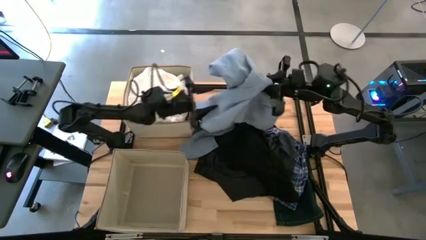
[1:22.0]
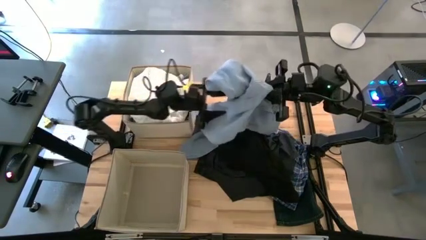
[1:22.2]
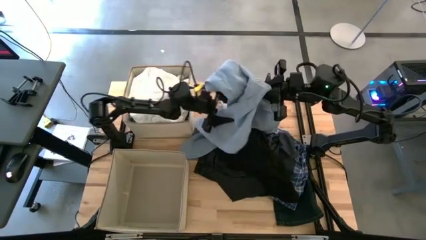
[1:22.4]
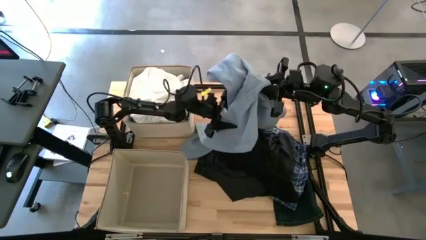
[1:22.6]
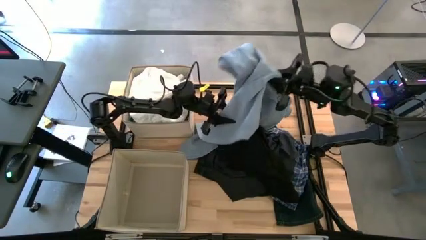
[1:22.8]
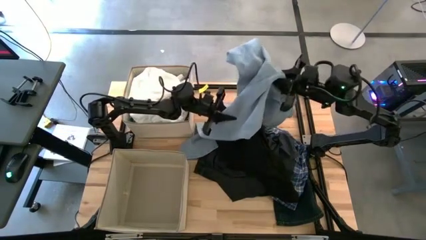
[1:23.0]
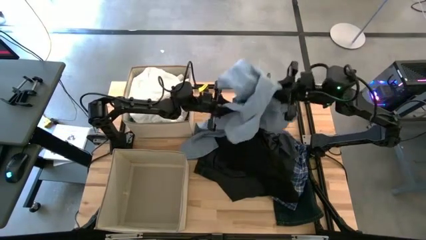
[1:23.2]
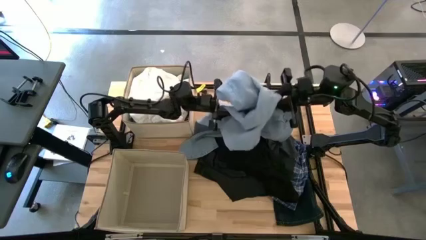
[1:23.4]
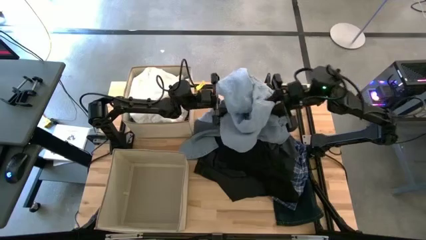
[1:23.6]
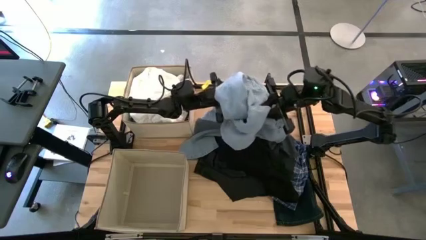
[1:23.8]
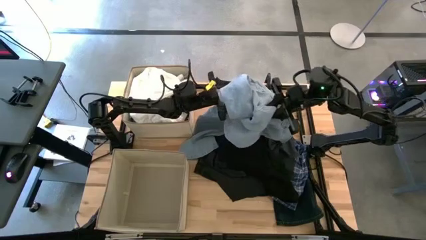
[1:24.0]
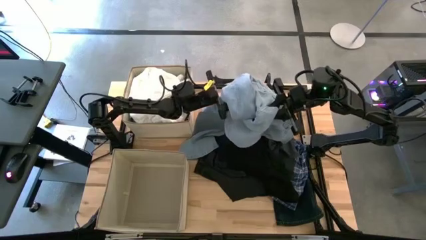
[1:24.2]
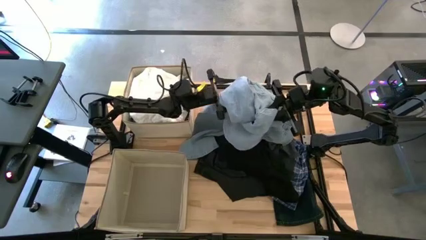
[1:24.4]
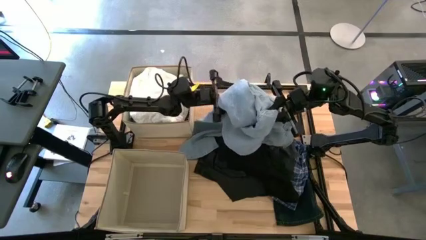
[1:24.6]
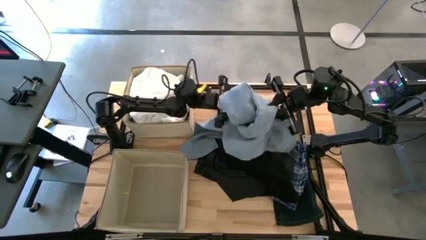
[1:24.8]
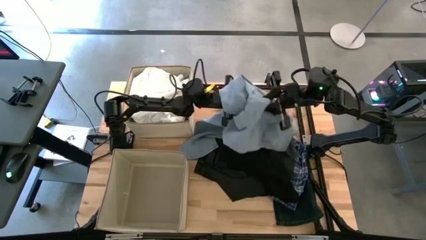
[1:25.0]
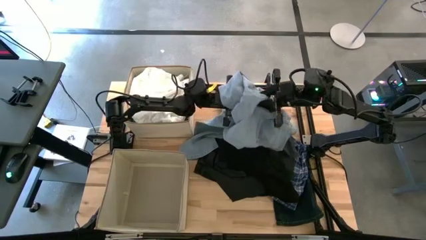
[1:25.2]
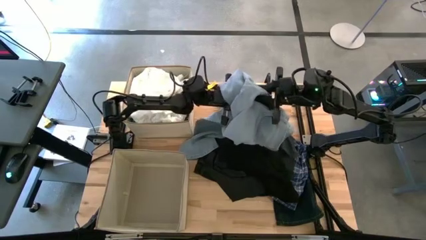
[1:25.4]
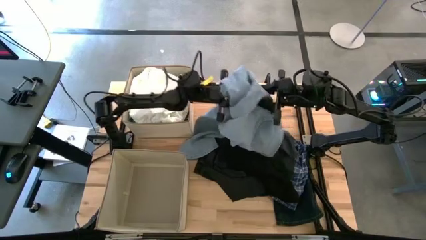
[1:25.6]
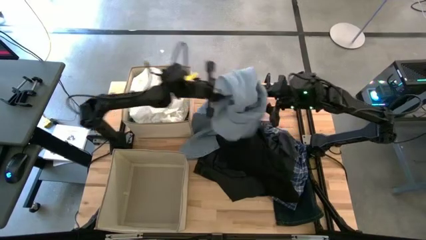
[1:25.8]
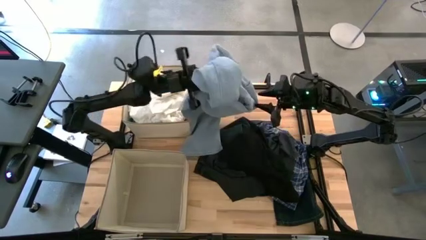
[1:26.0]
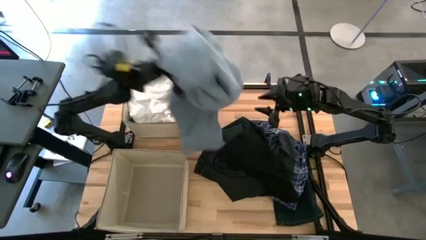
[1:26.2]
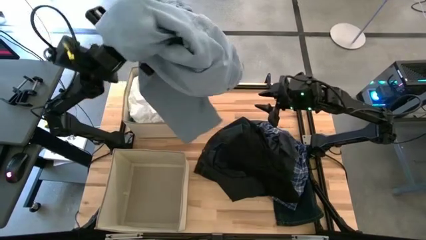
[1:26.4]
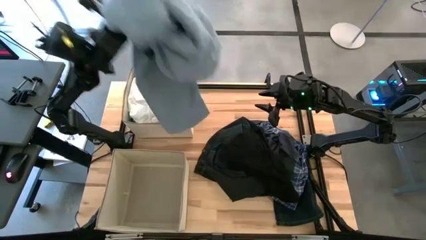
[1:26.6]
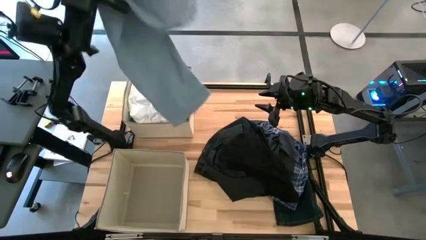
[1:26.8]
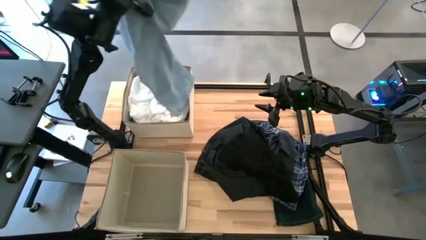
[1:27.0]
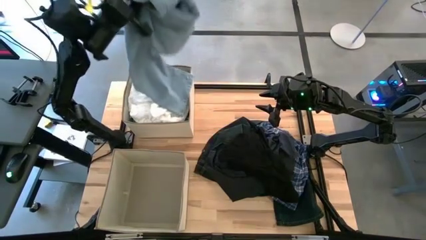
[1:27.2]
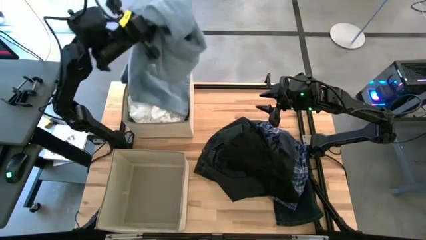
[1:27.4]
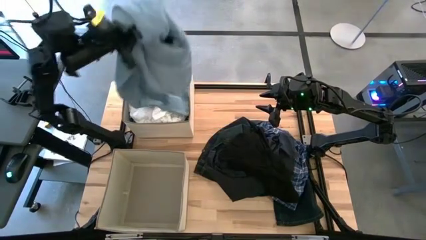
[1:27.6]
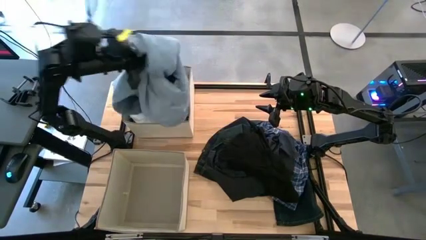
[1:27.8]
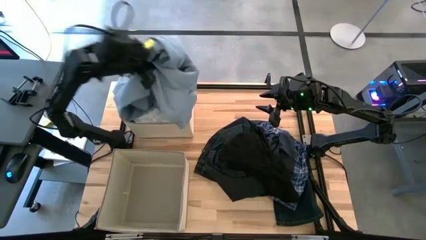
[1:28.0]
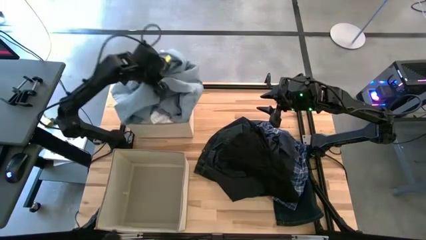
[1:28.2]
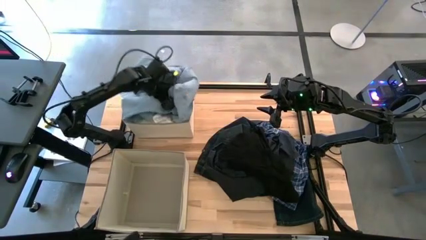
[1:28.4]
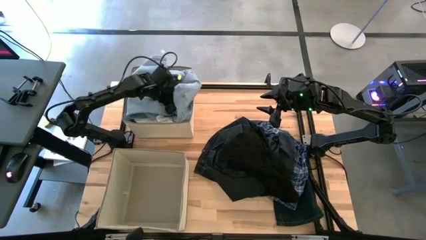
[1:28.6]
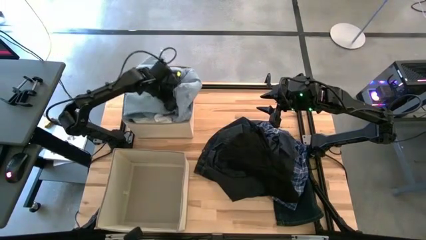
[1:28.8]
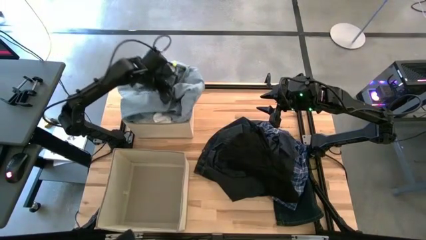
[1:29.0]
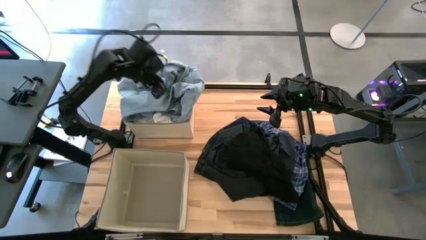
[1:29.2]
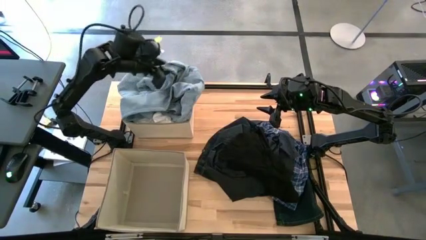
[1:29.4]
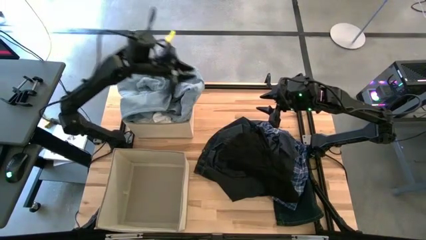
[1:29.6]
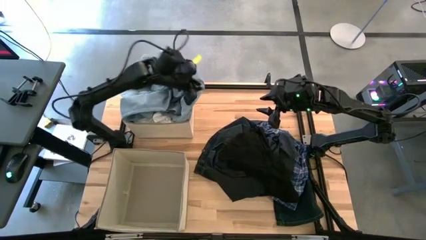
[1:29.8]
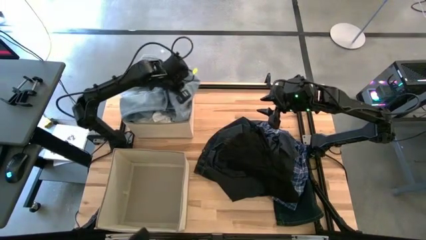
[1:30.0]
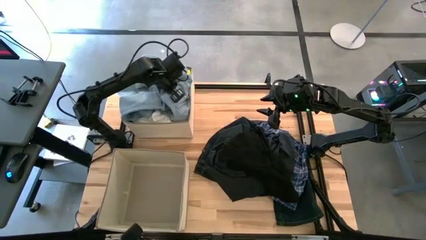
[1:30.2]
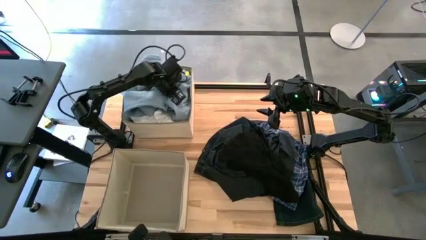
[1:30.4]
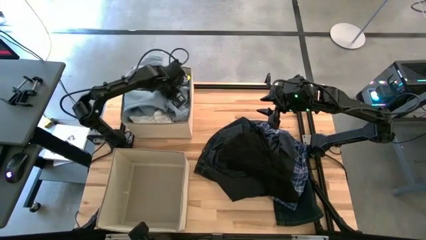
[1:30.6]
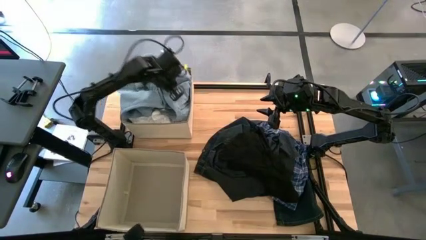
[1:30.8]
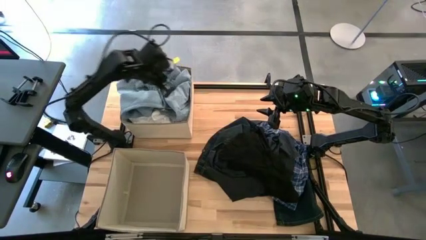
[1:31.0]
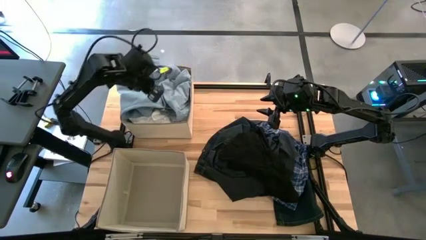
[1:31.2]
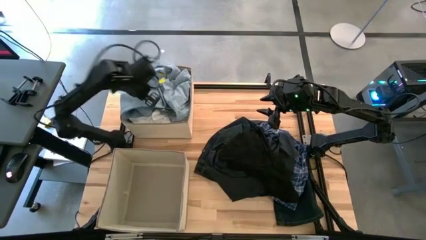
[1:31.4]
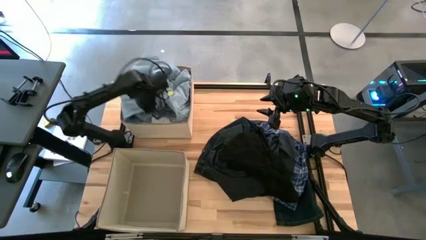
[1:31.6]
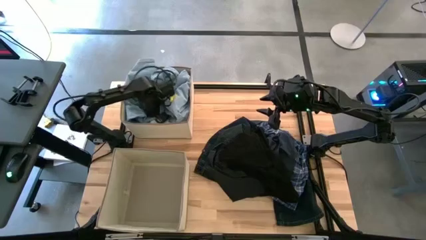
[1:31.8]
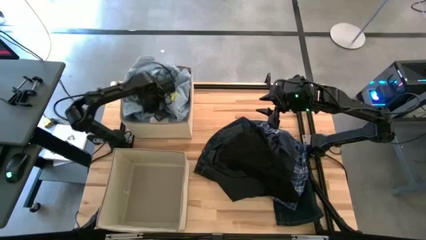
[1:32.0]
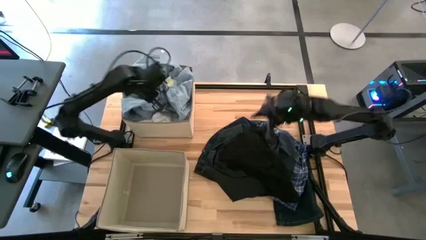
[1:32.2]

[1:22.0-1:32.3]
Task: Sort clothes
Put the blue jeans into the top brown laundry organizer

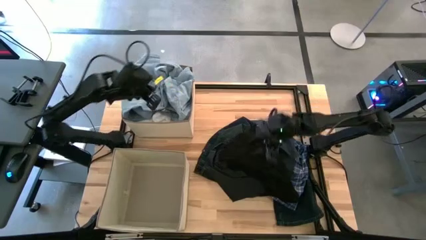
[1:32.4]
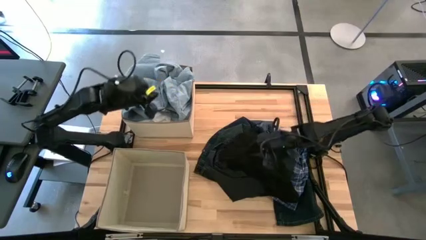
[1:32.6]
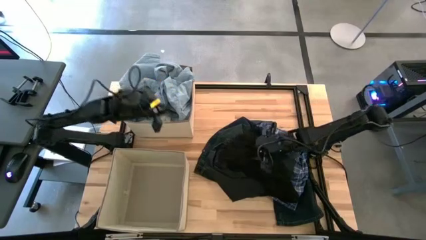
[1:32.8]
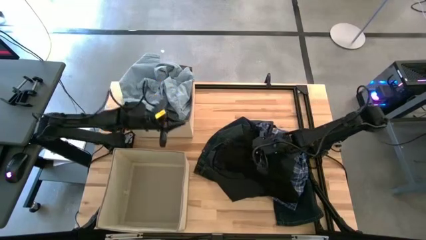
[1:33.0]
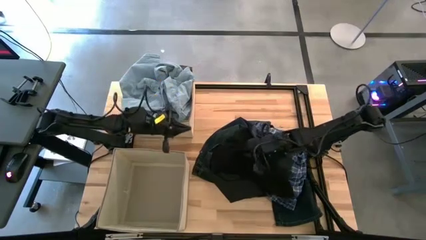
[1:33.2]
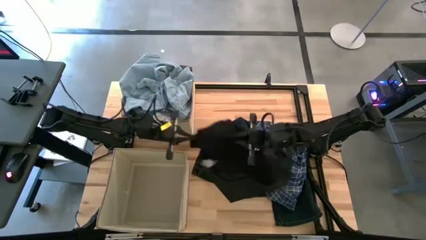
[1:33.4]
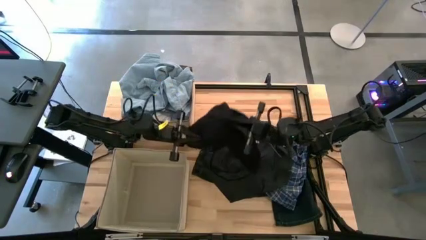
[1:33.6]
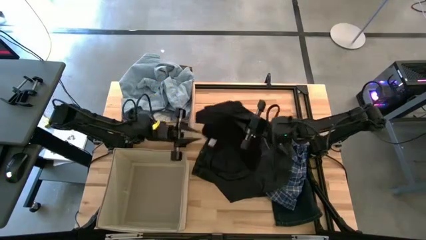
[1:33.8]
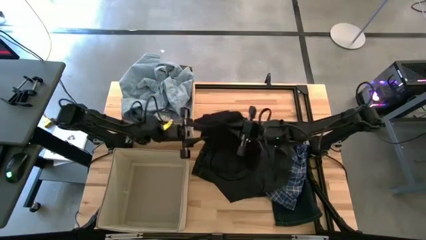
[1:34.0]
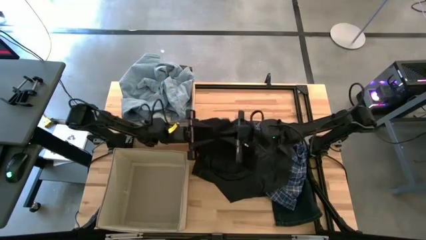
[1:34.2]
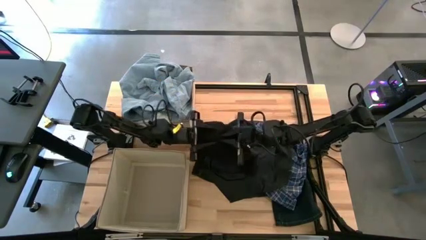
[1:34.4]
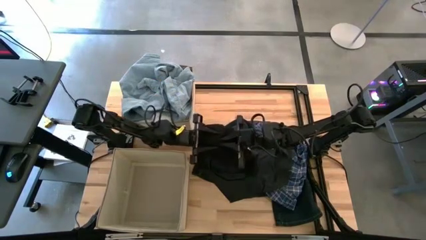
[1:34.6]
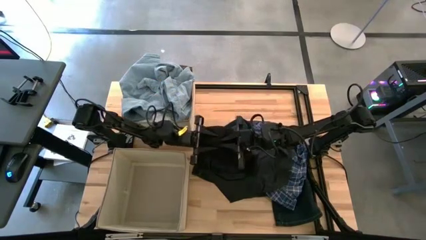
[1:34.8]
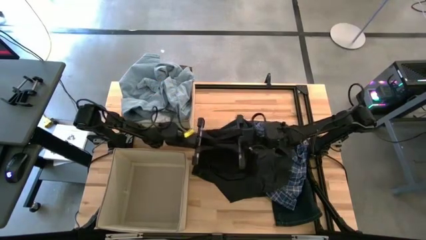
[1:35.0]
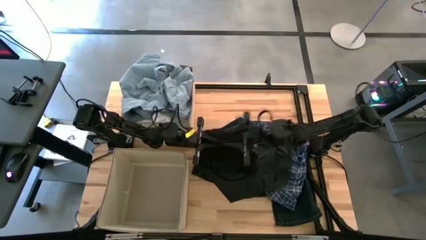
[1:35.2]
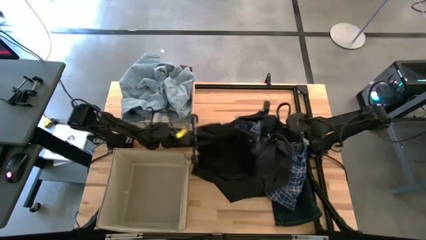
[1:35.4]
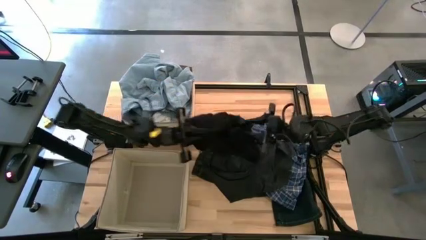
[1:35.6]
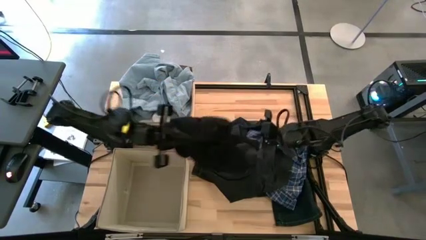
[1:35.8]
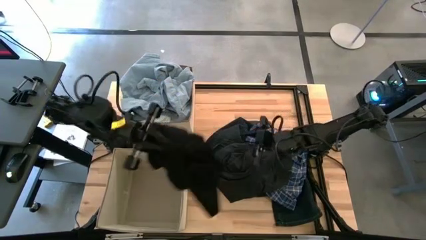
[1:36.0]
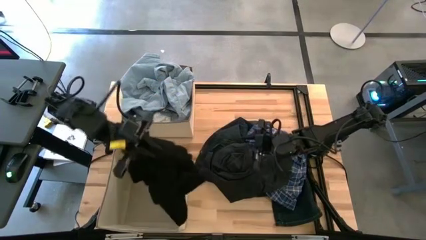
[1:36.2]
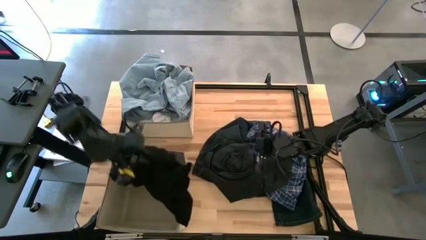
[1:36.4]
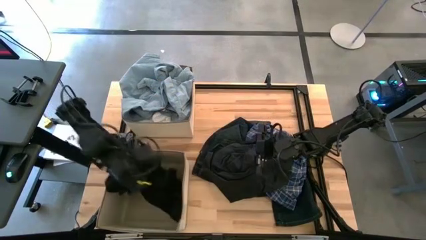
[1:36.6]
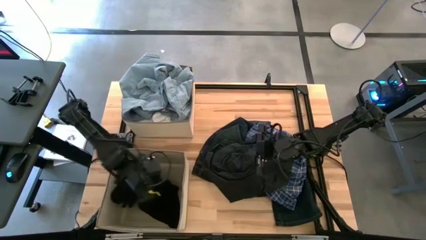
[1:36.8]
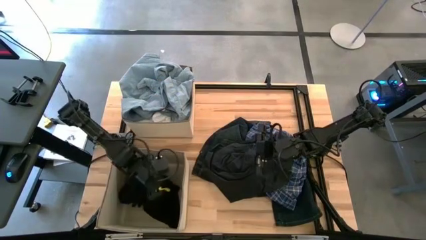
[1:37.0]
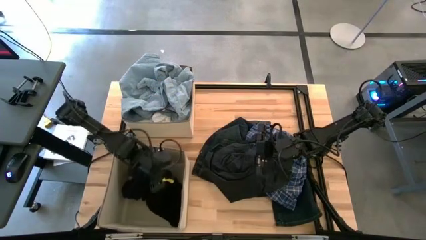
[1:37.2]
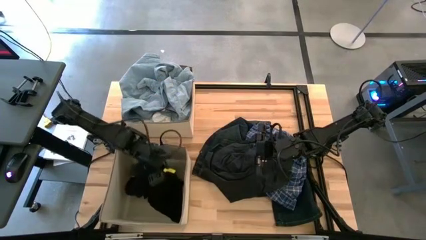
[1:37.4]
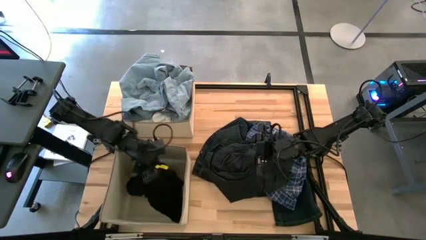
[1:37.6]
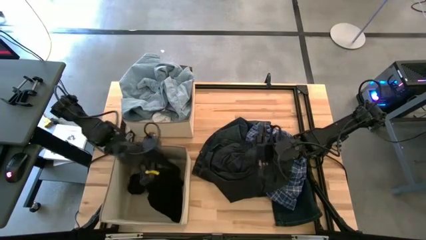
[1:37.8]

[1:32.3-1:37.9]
Put the top black shorts into the bottom brown laundry organizer

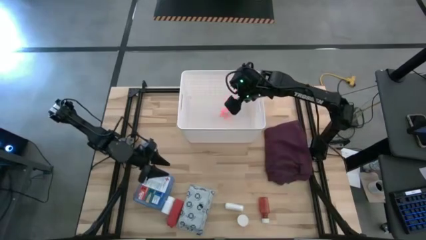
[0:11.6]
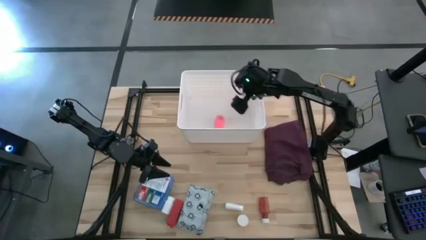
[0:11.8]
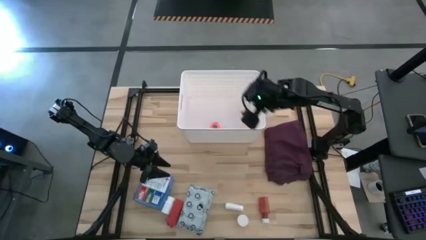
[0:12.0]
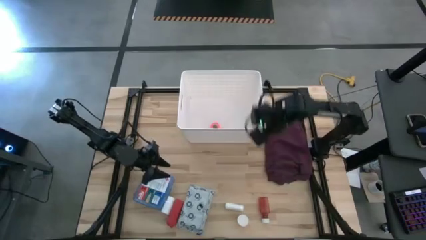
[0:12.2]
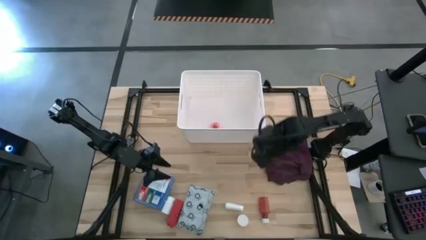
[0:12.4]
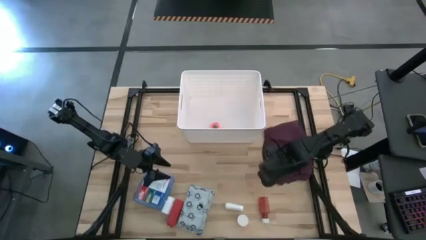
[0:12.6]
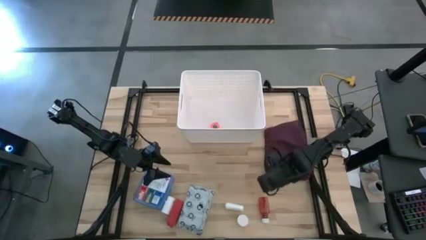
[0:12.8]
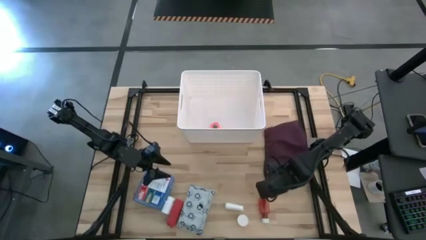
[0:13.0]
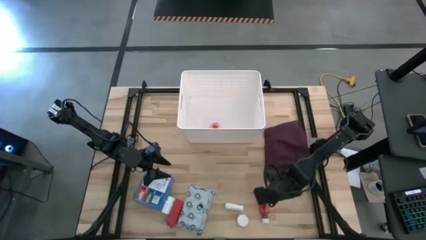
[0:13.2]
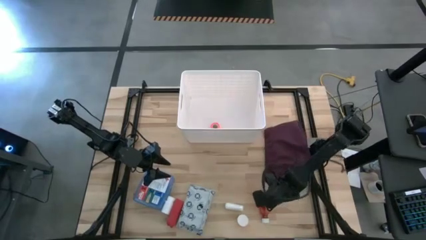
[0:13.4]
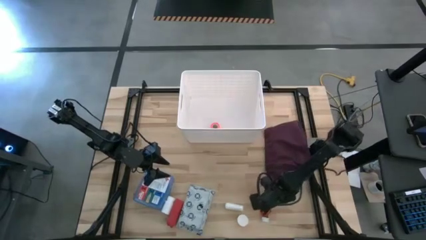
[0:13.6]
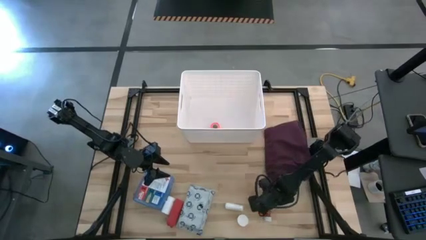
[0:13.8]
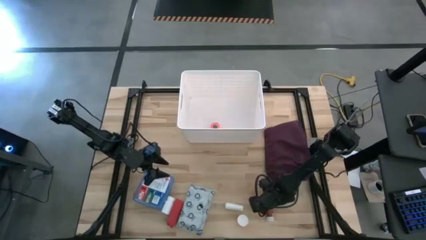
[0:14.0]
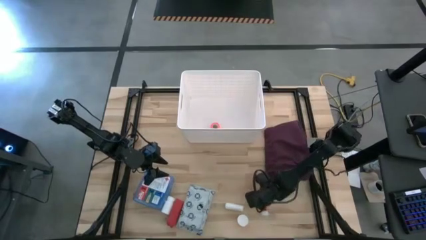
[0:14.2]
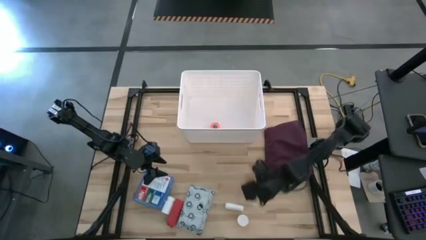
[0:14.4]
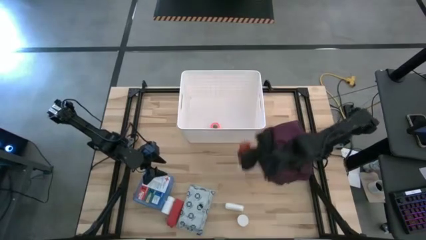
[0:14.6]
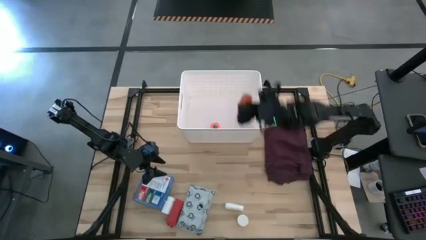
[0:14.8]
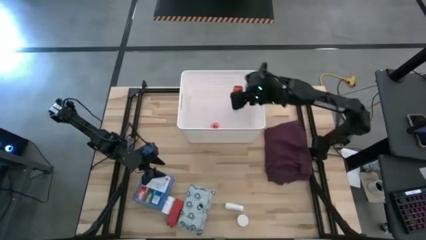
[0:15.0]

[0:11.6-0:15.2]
Task: Pick & place medical supplies in basket/bin
Put the red pill bottle into the white bin
